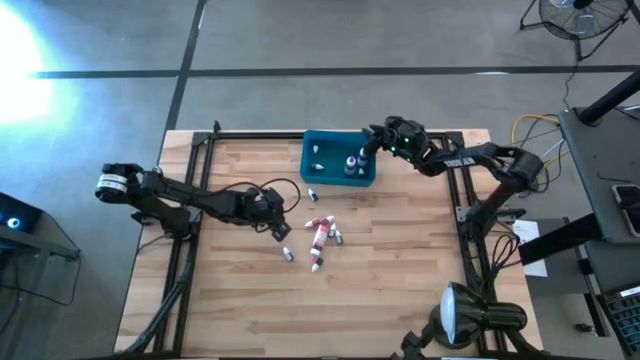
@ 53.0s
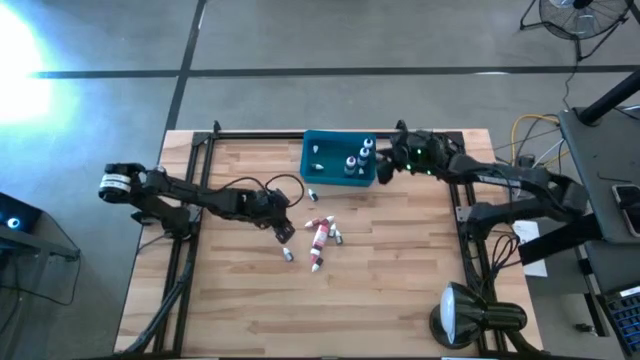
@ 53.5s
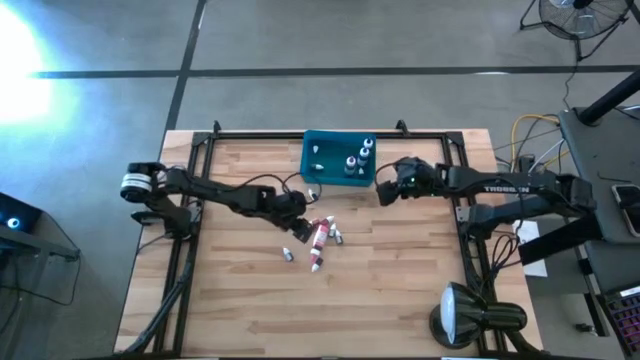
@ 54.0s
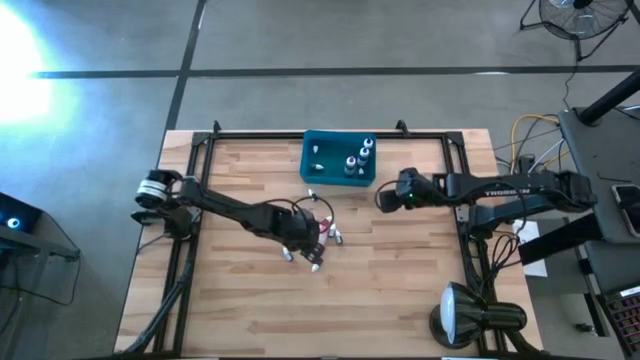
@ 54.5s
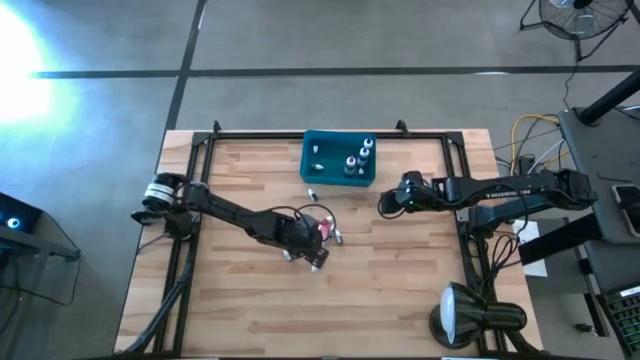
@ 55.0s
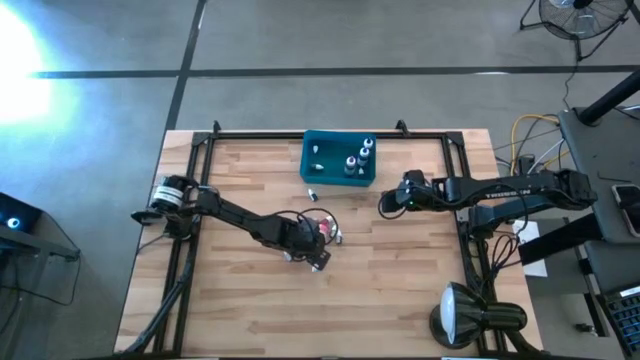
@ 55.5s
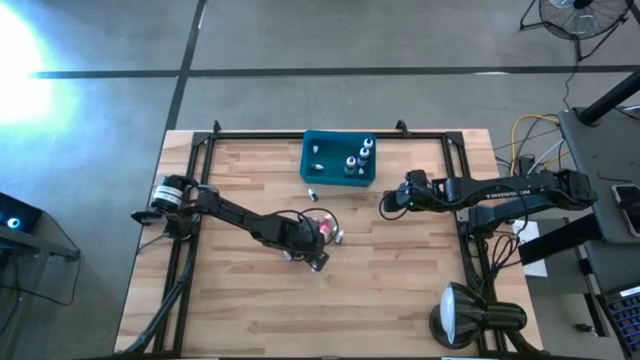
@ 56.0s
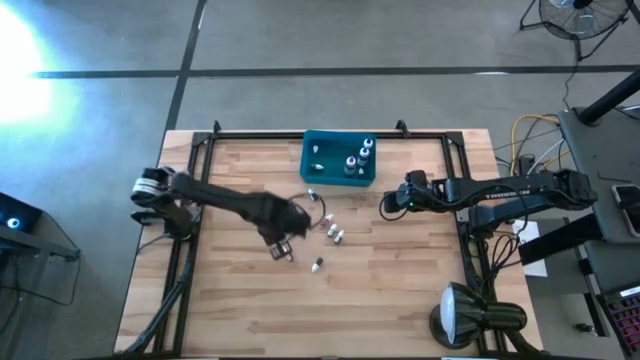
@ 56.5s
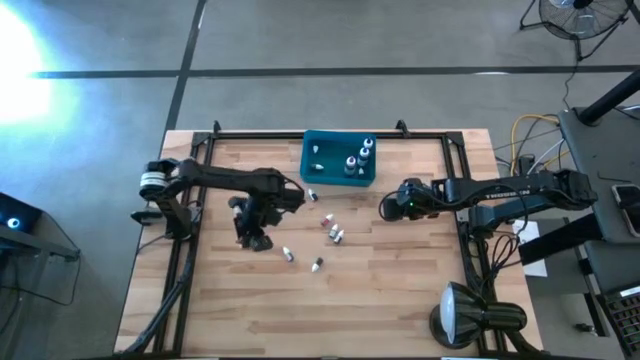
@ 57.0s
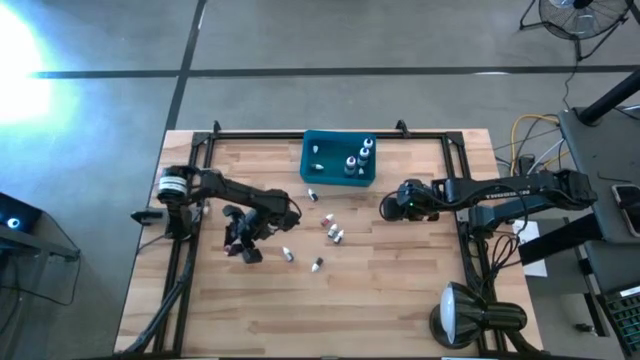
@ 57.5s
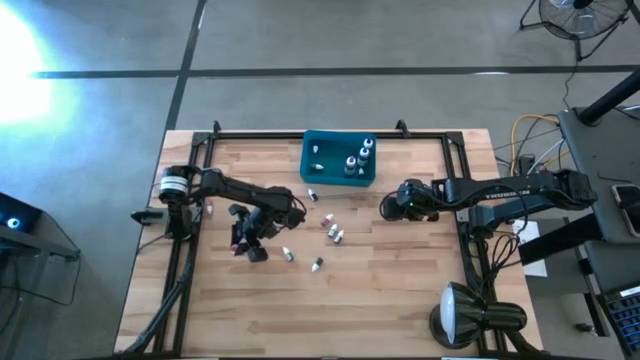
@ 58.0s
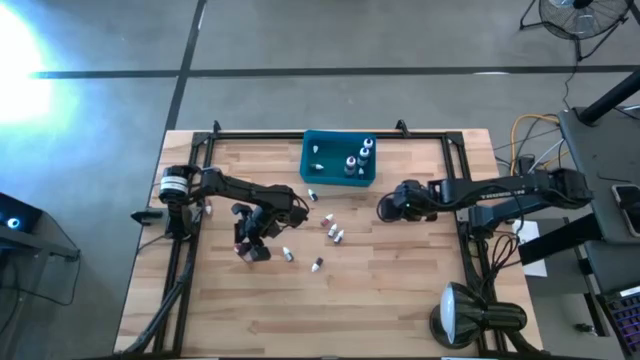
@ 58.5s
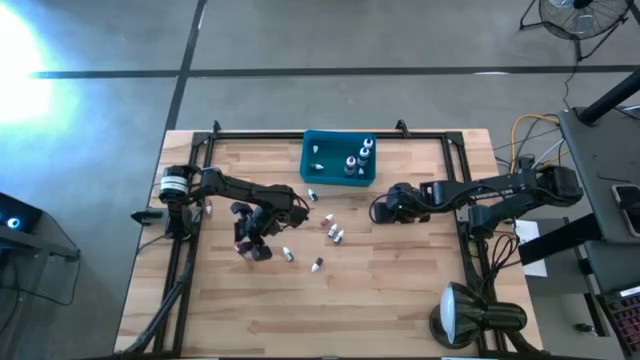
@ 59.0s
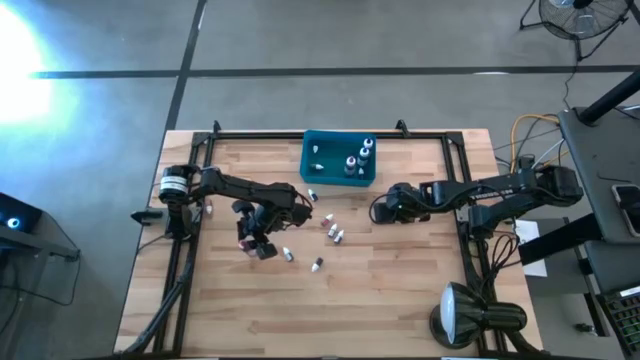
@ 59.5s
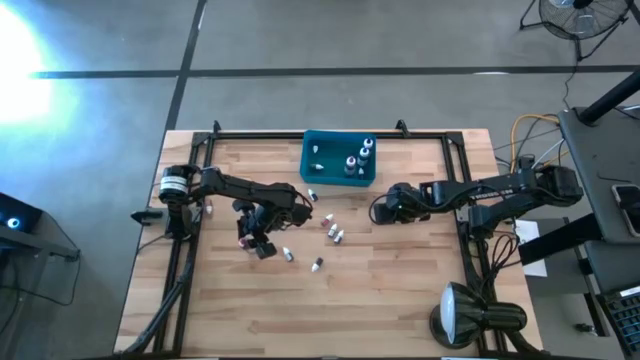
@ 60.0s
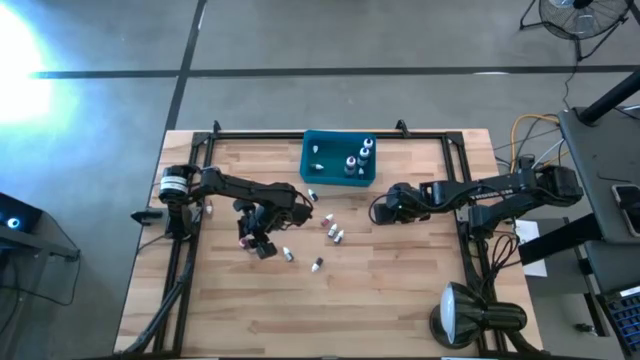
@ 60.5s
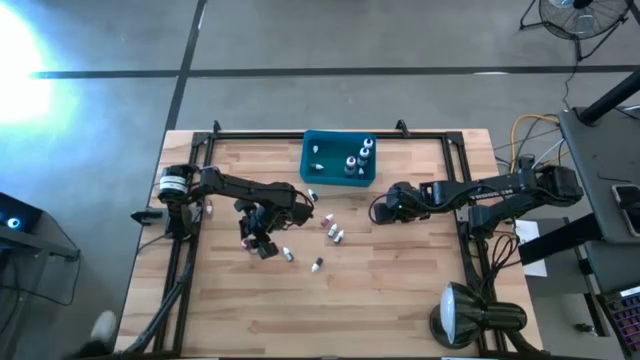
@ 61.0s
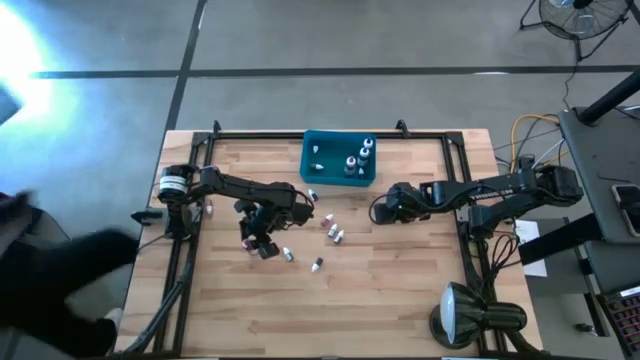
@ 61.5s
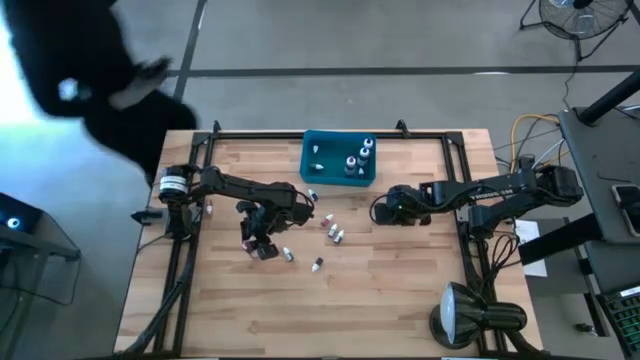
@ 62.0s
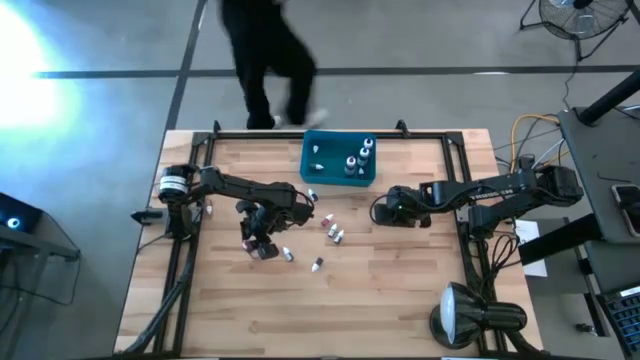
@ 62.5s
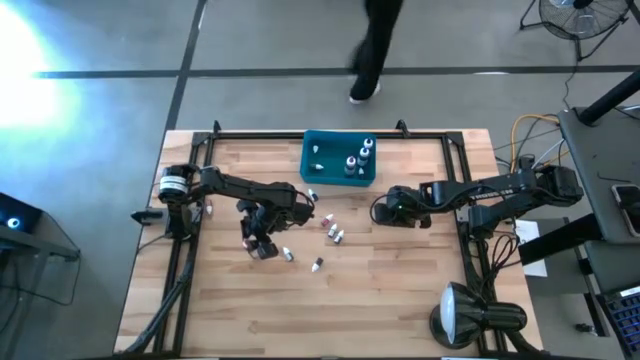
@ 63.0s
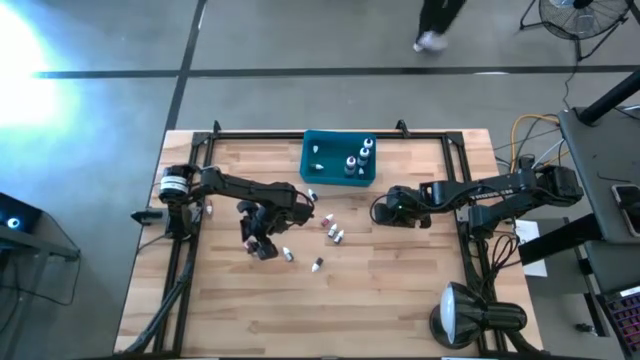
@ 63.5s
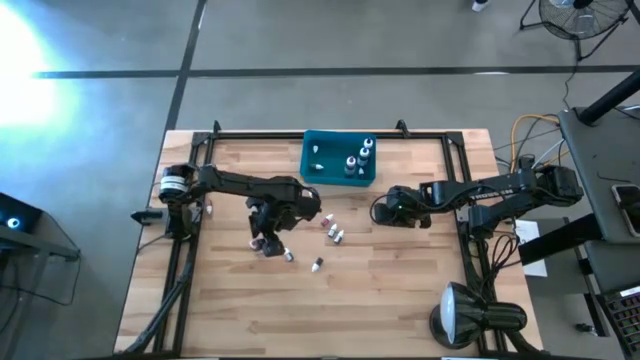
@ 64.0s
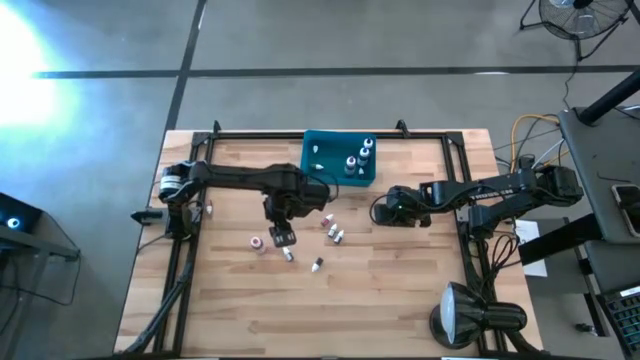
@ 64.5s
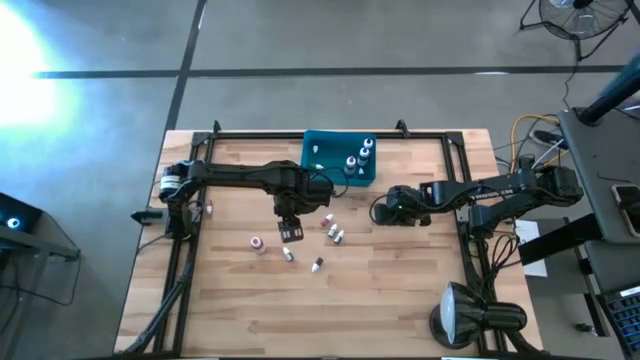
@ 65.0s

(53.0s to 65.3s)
Task: Pick & Place food coloring
Put the large pink food coloring bottle into the blue bin

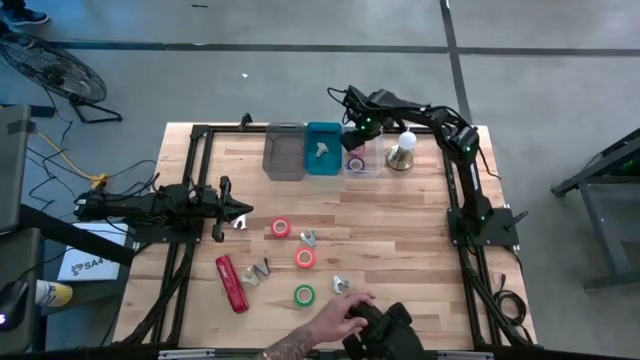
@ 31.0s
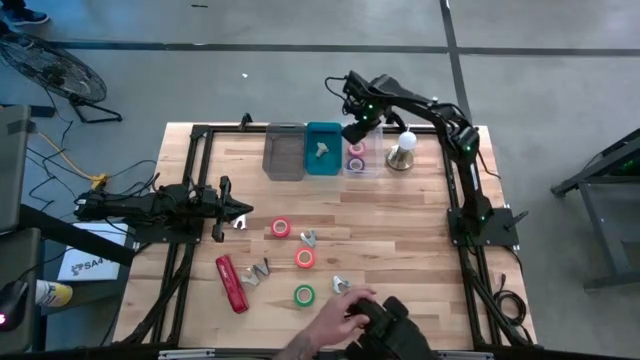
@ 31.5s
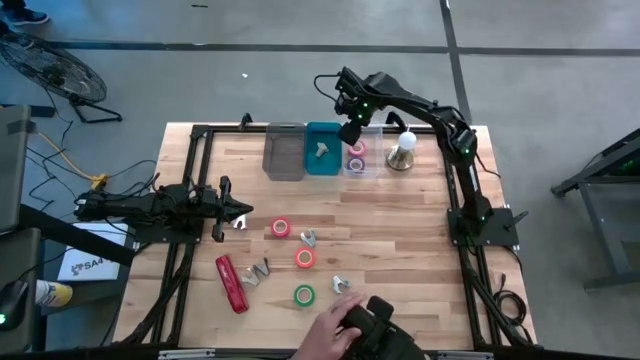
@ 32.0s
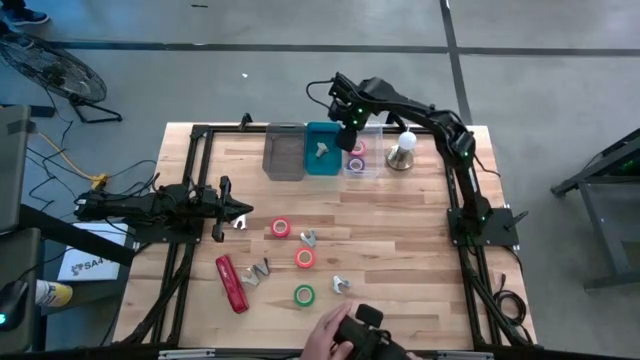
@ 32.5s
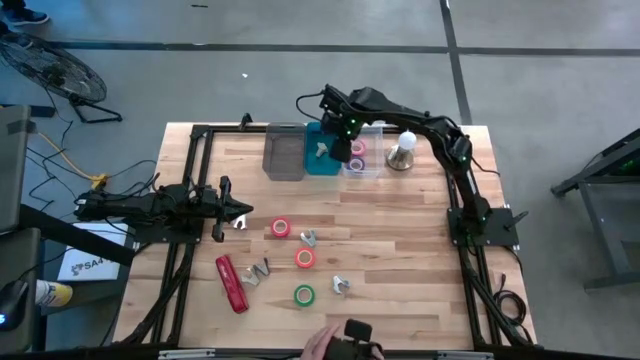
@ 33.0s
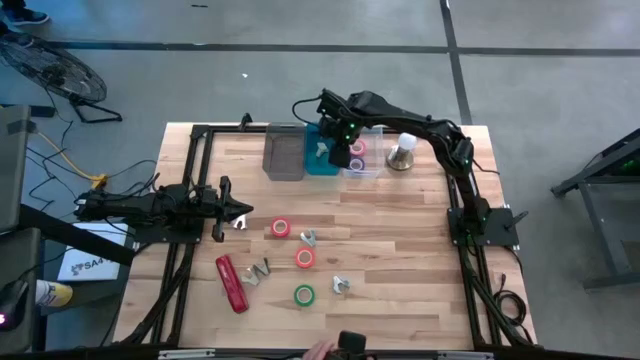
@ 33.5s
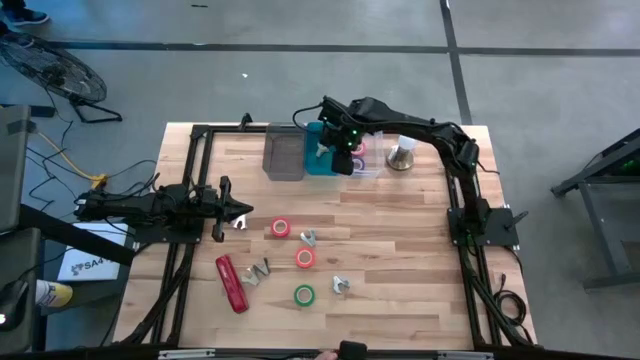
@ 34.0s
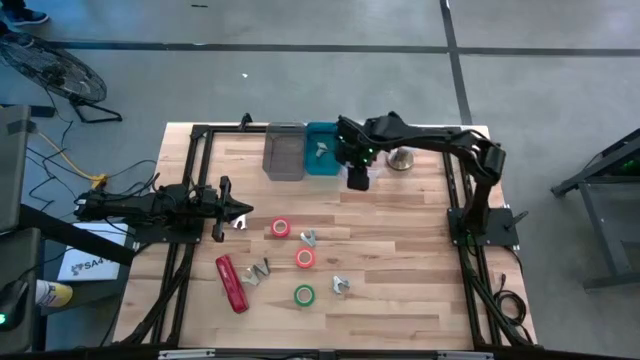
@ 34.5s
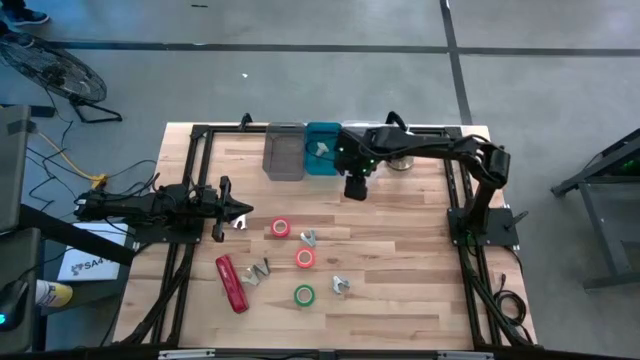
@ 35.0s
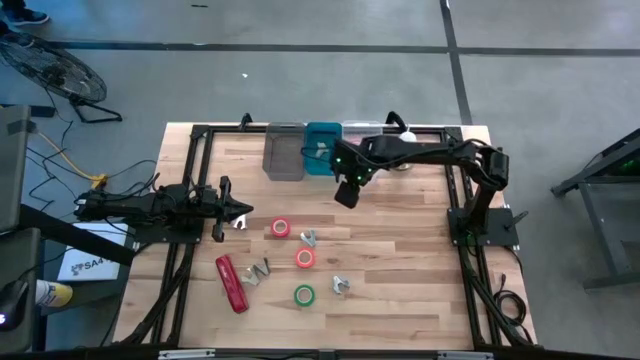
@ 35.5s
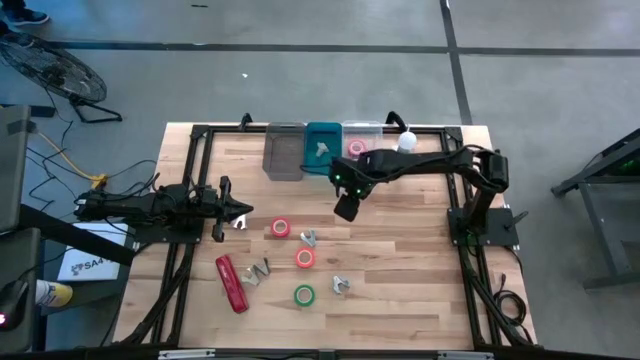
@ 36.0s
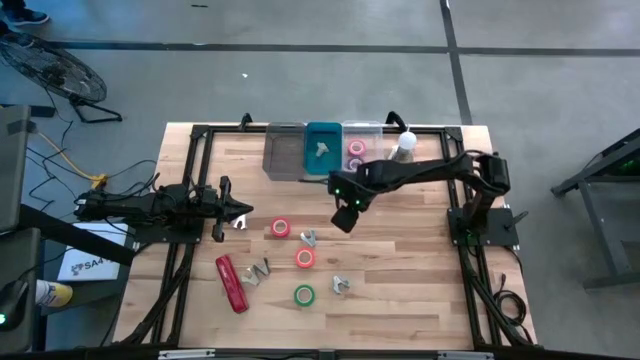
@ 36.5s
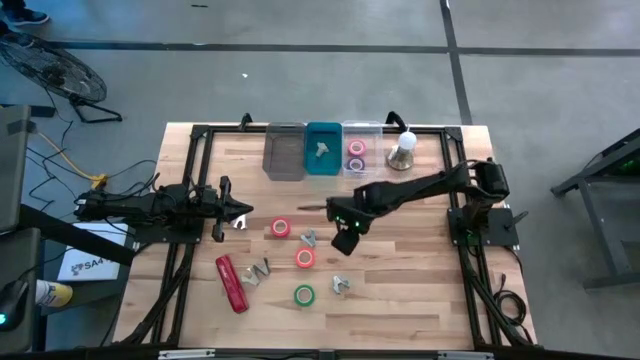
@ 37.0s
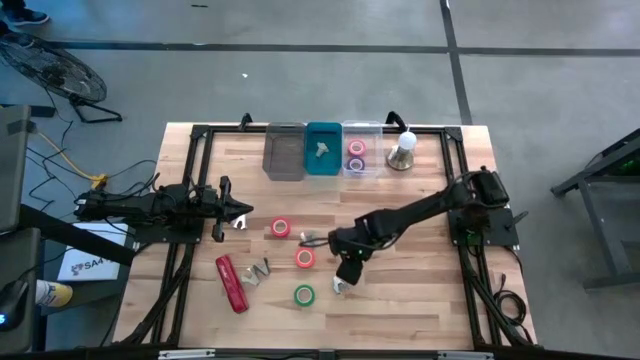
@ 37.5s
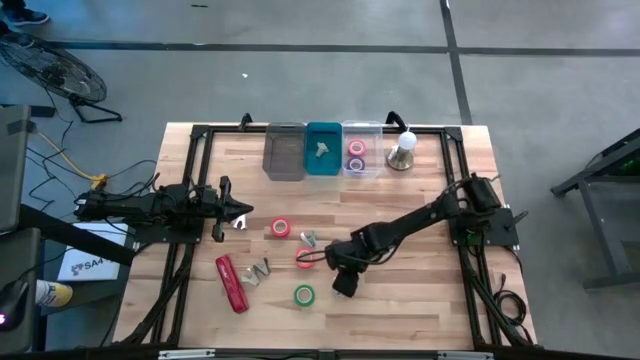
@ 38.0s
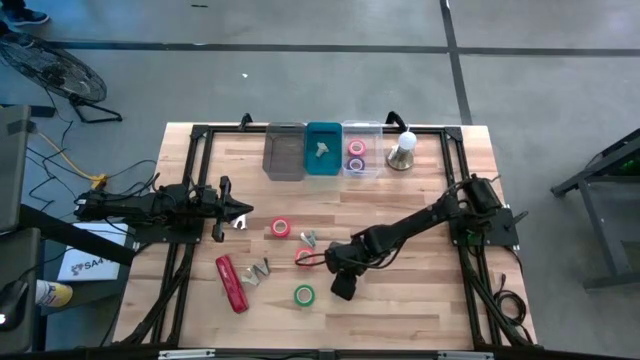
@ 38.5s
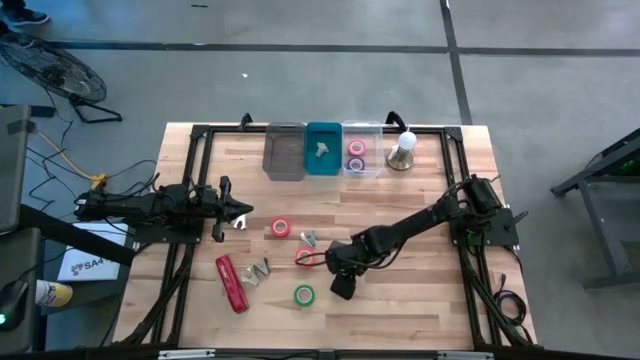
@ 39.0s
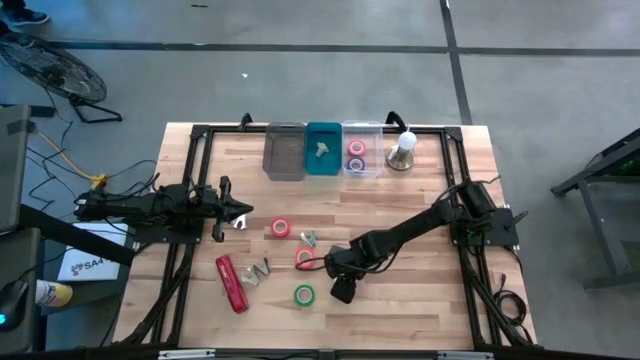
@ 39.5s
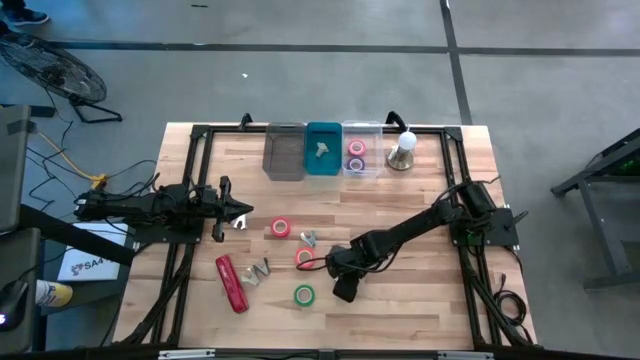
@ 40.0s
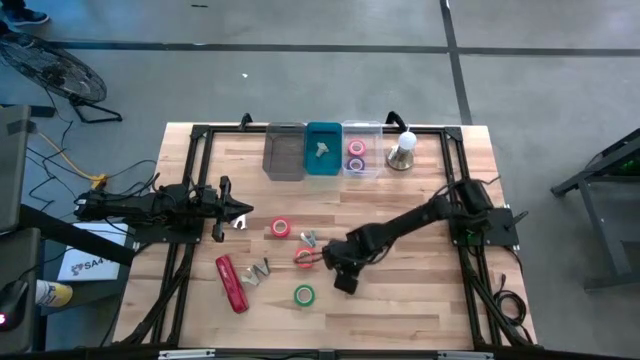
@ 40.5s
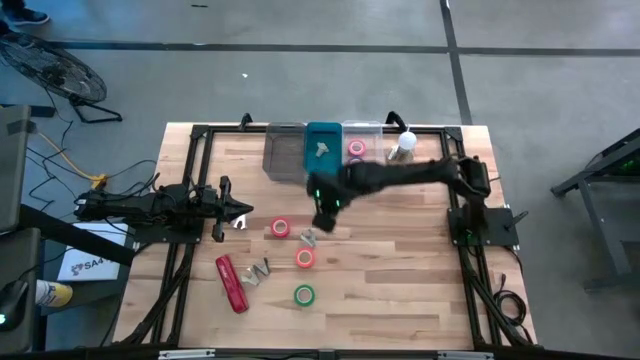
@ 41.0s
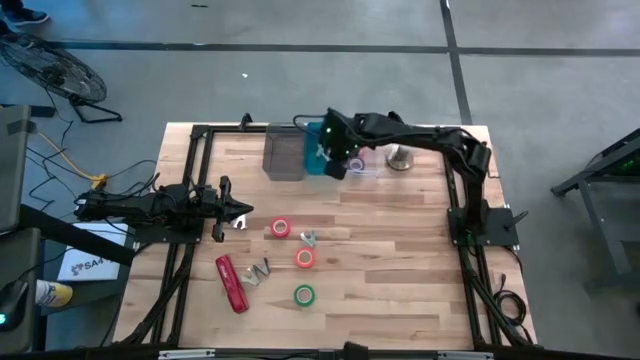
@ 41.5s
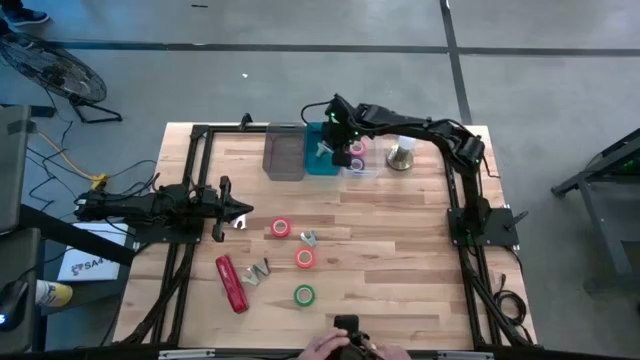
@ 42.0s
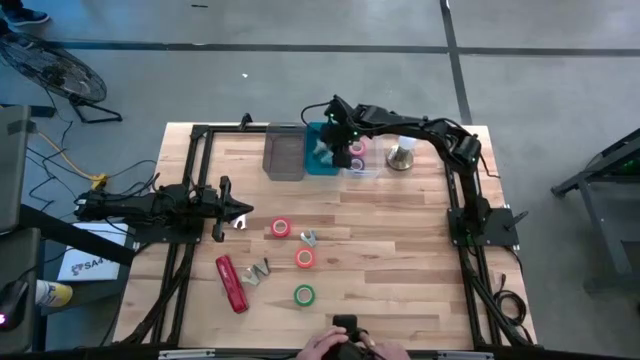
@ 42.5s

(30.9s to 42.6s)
Task: Pick and place Stapler, Stapler remover, tape
Put the bottom blue staple remover into the blue bin
